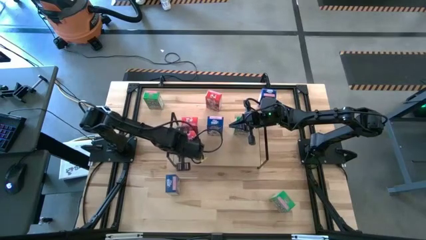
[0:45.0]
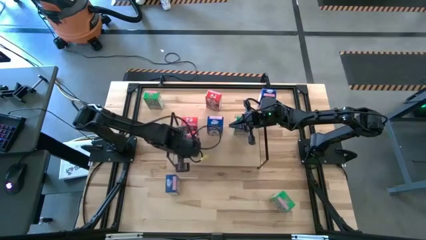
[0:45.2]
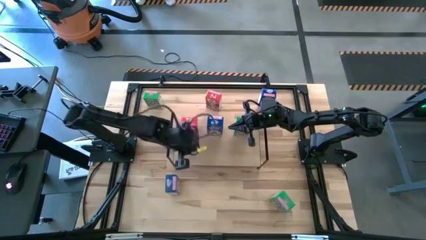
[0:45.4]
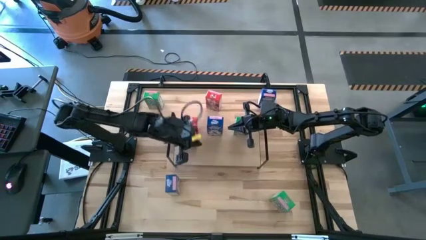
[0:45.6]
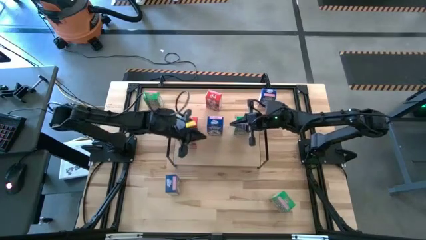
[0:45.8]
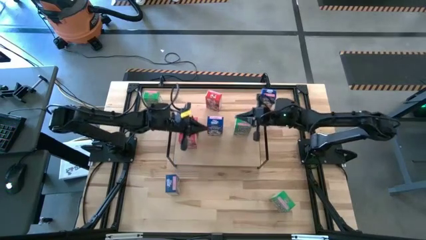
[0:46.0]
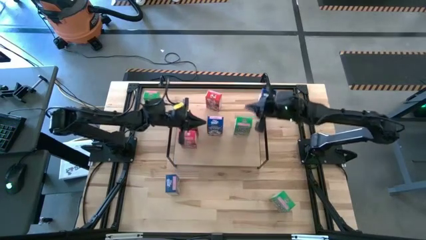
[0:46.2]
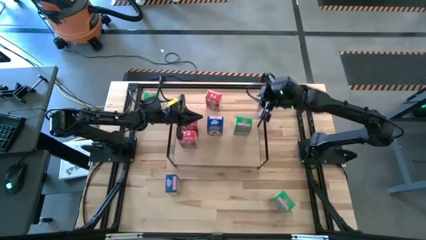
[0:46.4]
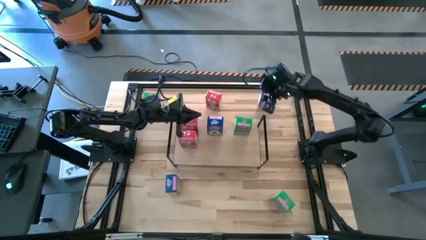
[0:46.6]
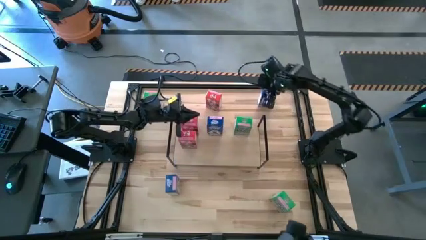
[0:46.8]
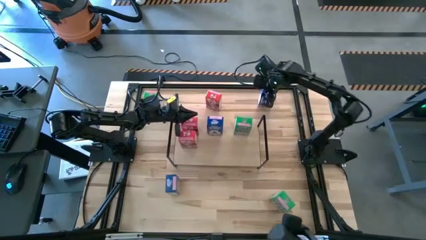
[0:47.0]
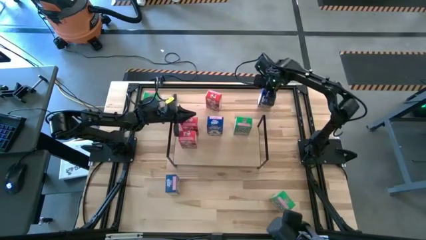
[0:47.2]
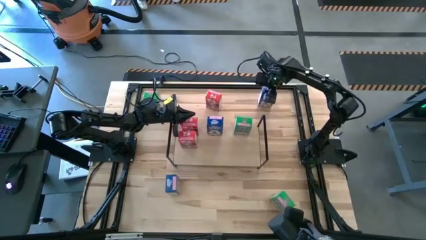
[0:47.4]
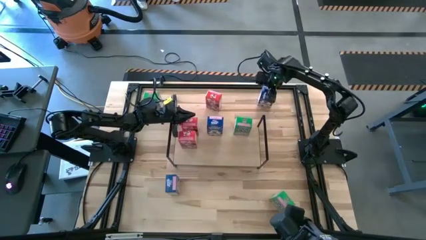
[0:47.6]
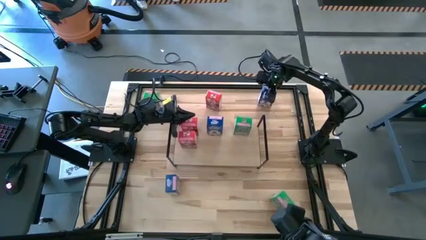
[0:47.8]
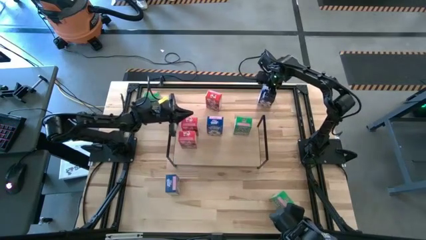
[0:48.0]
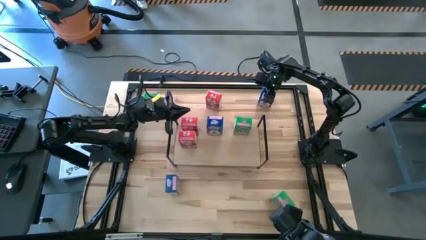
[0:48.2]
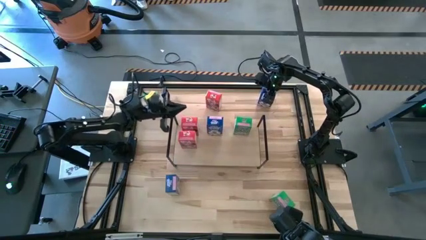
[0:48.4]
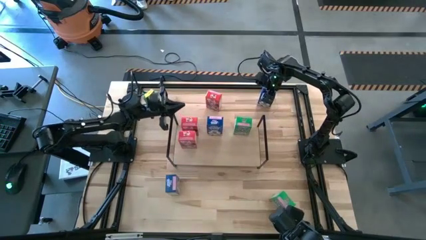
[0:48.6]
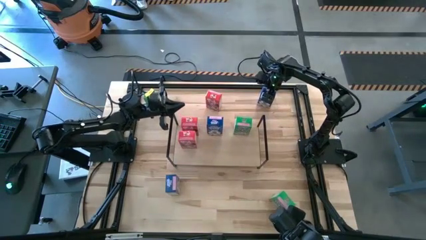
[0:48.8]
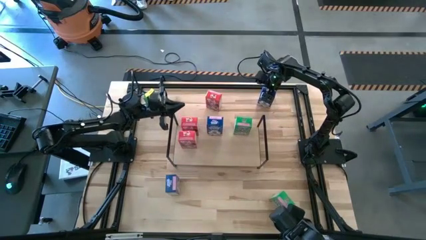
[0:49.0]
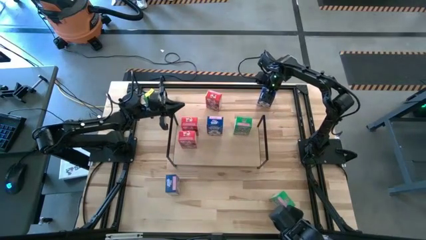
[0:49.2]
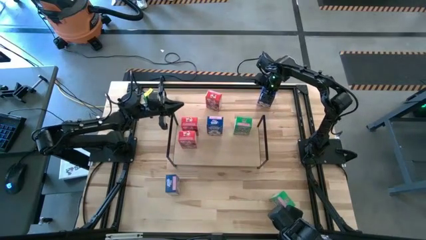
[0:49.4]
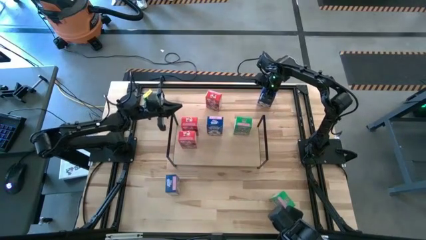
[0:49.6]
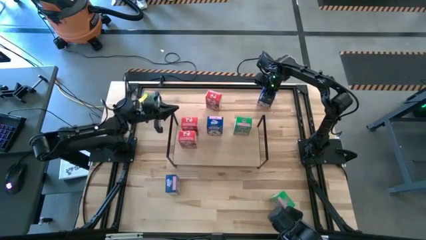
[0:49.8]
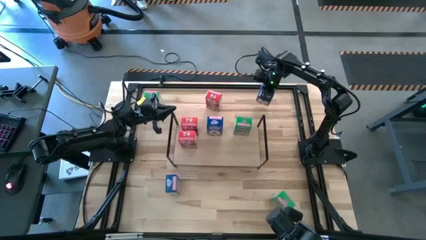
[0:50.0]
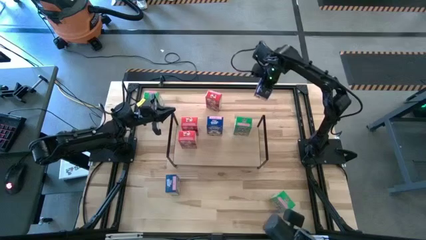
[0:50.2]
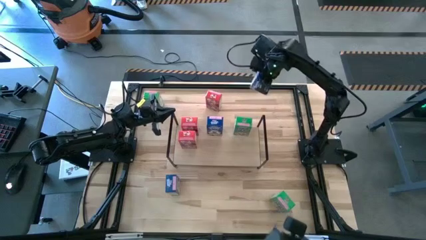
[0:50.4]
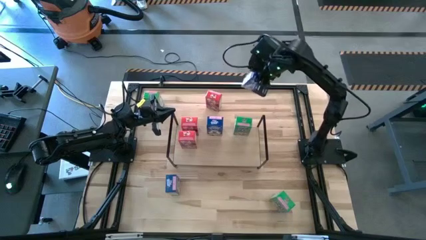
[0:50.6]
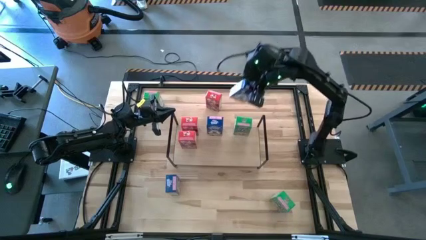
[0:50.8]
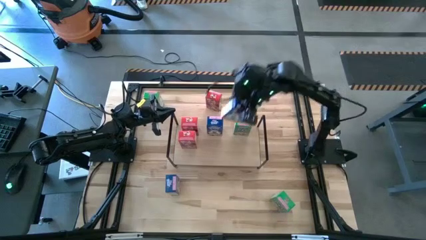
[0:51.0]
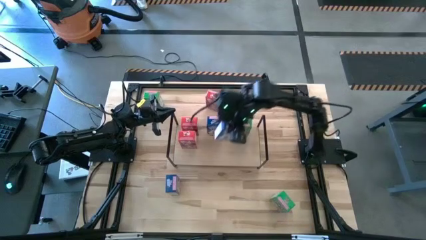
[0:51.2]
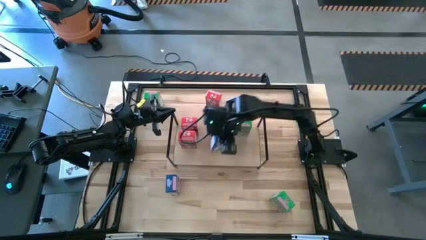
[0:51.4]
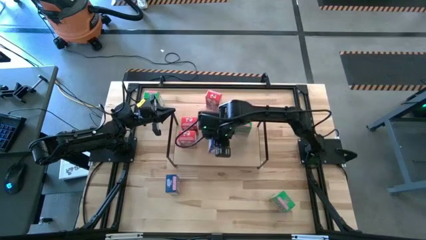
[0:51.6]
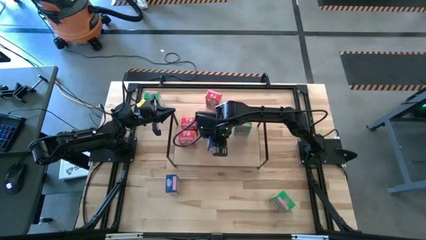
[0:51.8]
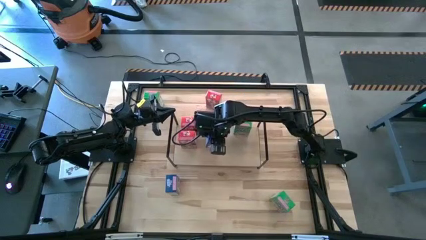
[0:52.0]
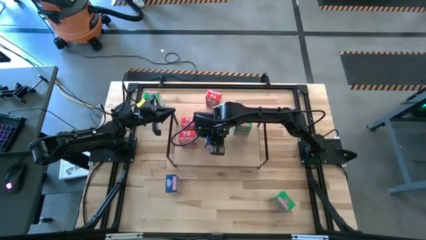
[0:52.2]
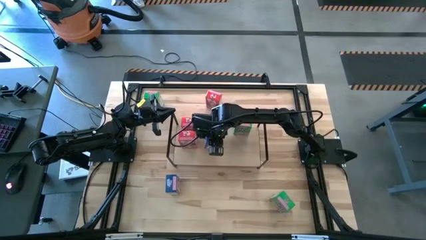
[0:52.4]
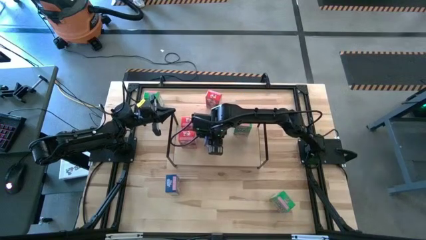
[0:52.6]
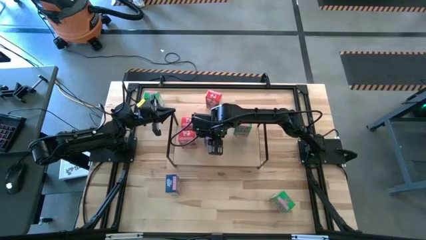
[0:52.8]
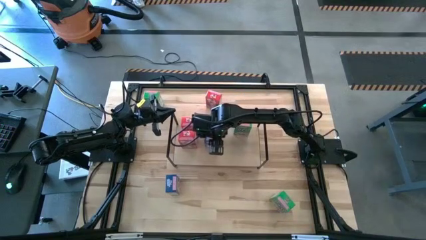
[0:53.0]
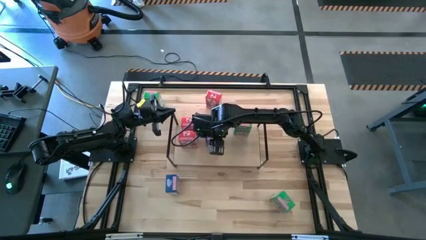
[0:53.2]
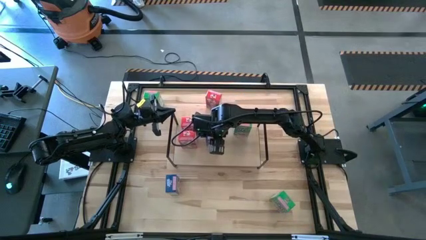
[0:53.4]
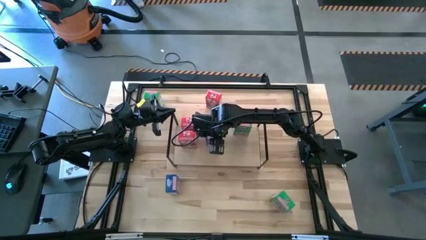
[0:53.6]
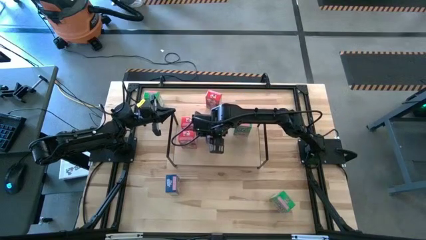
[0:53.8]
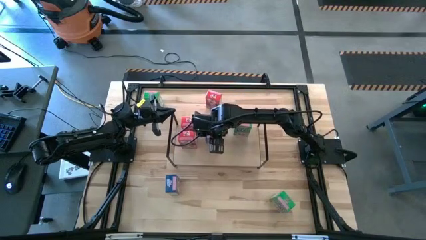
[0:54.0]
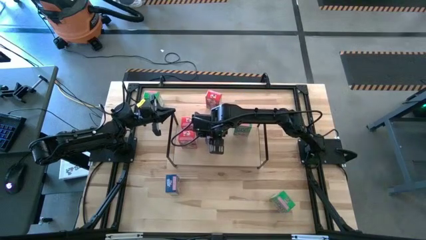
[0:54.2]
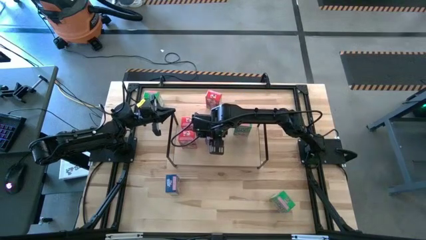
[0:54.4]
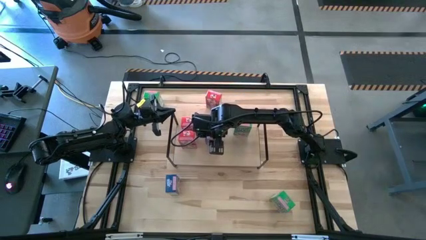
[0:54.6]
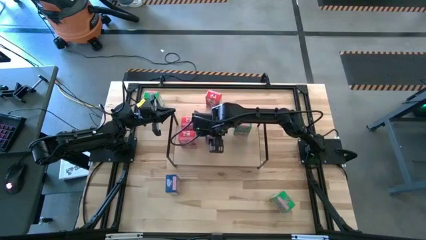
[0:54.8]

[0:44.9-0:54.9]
Task: Stack cereal on shelf
Put the top blue cereal box on the shelf aligned with the other blue cereal box

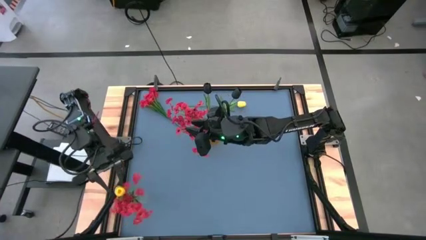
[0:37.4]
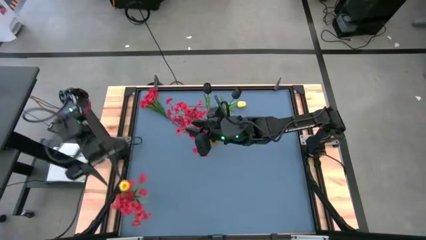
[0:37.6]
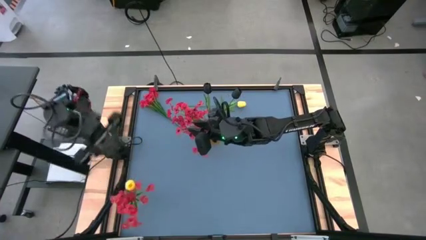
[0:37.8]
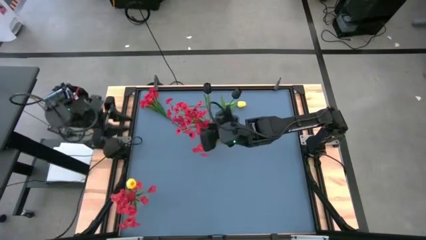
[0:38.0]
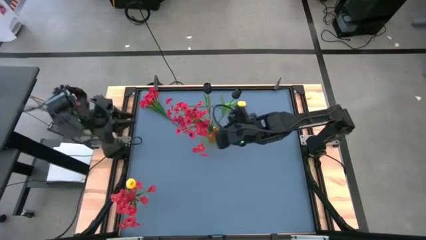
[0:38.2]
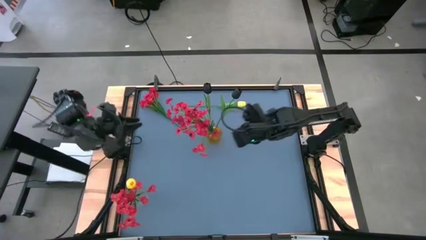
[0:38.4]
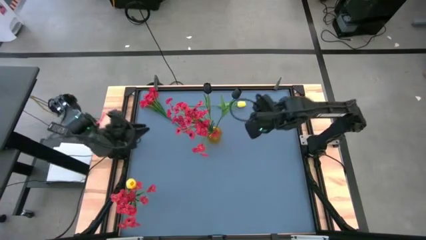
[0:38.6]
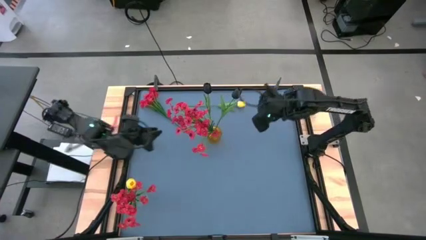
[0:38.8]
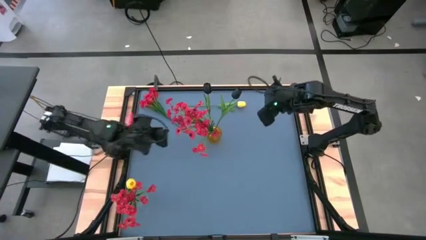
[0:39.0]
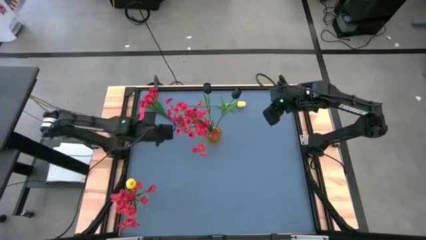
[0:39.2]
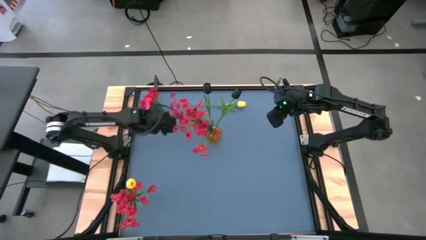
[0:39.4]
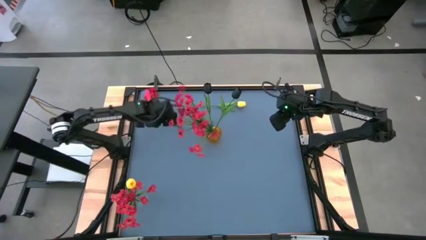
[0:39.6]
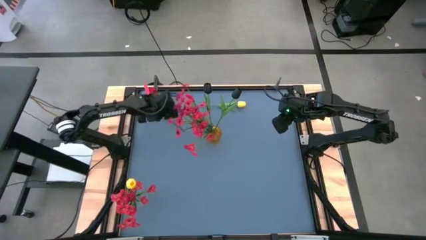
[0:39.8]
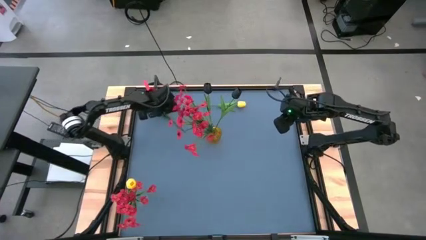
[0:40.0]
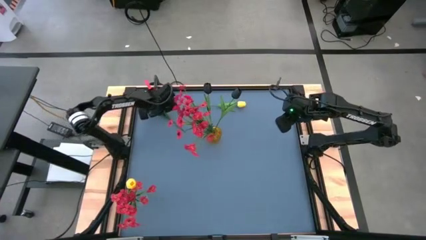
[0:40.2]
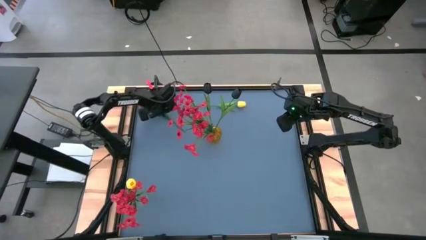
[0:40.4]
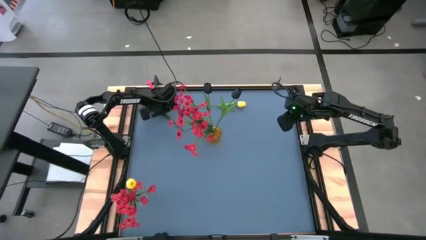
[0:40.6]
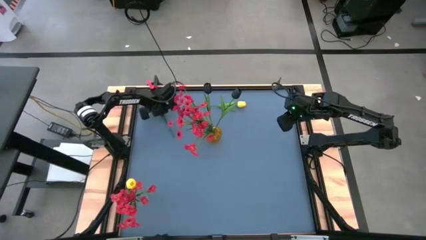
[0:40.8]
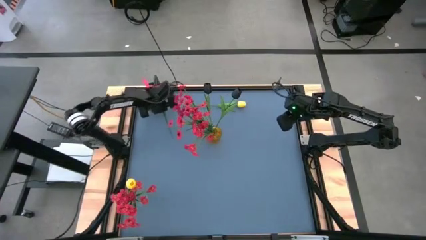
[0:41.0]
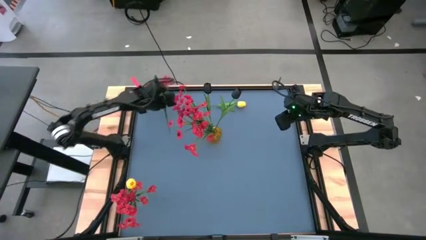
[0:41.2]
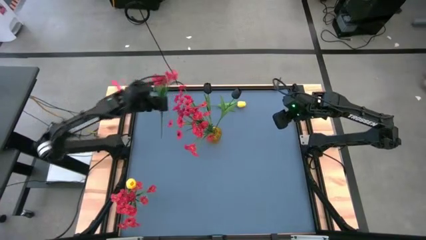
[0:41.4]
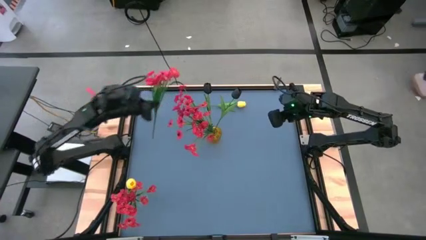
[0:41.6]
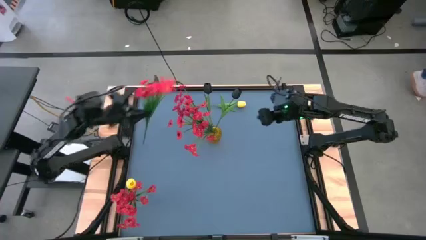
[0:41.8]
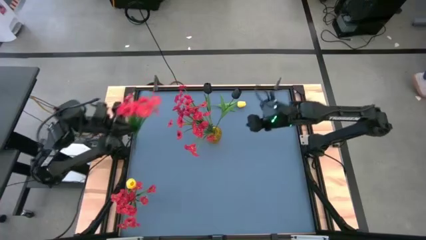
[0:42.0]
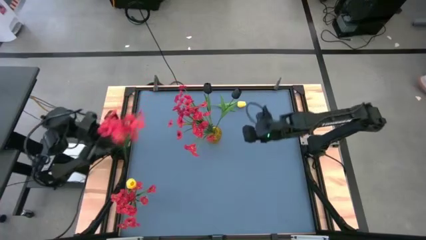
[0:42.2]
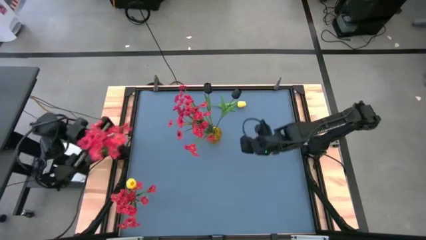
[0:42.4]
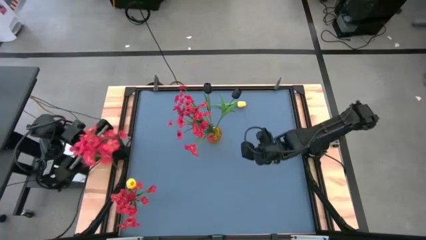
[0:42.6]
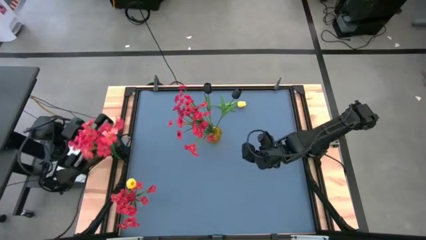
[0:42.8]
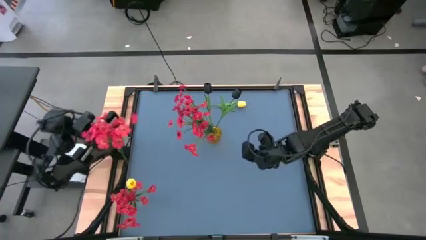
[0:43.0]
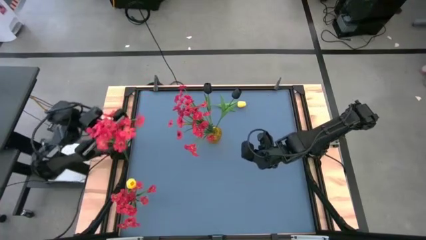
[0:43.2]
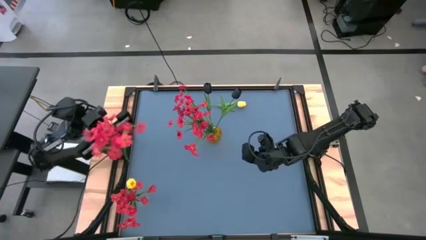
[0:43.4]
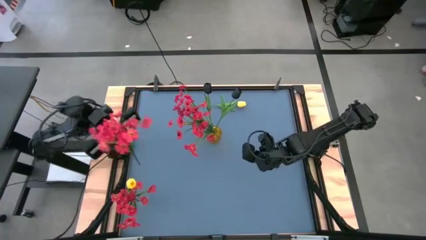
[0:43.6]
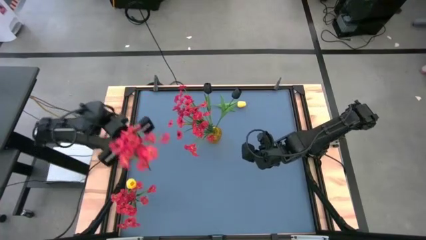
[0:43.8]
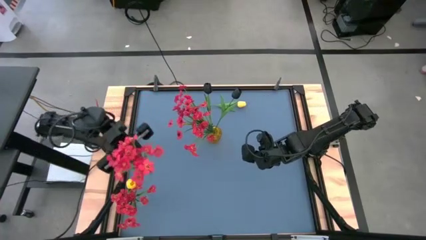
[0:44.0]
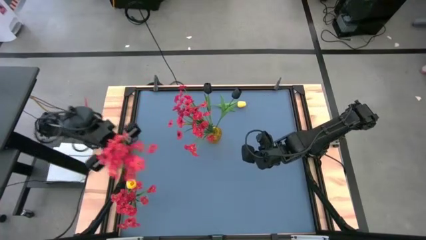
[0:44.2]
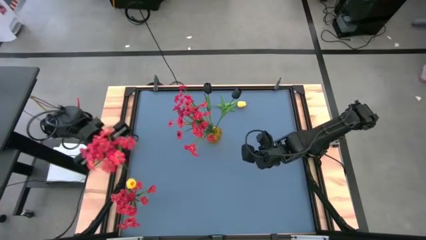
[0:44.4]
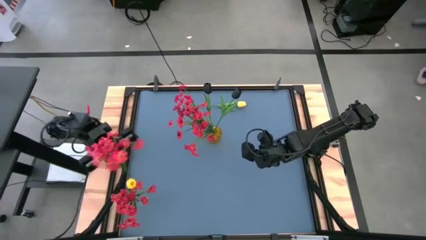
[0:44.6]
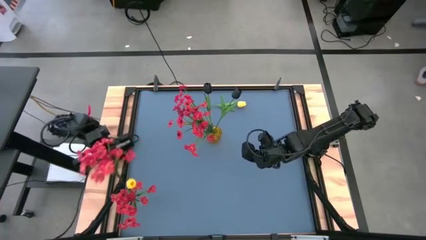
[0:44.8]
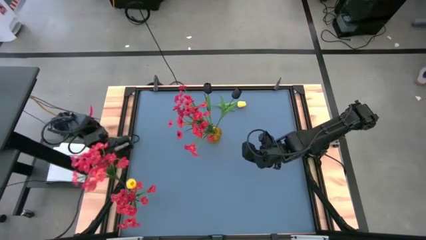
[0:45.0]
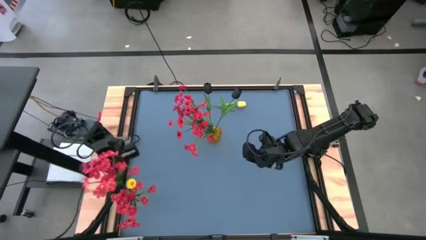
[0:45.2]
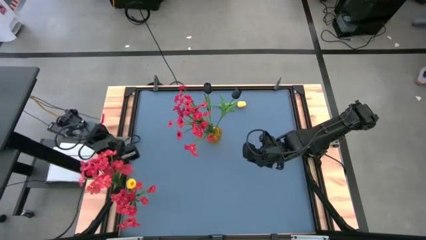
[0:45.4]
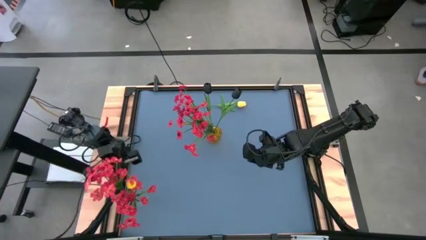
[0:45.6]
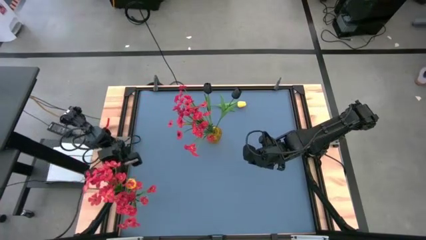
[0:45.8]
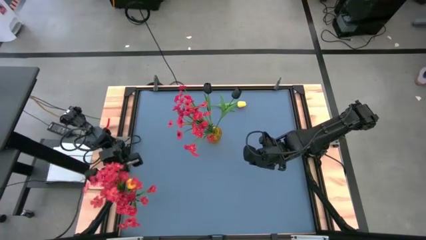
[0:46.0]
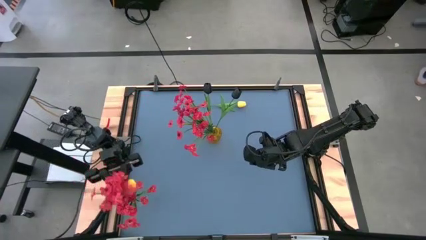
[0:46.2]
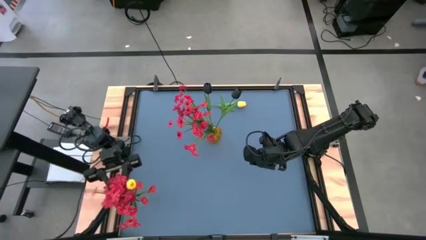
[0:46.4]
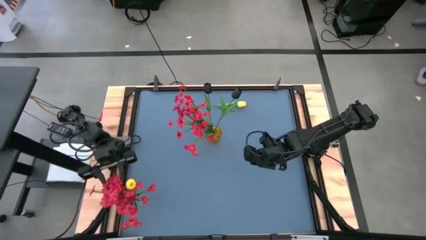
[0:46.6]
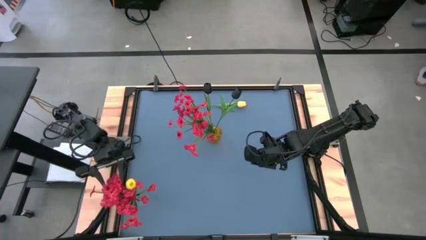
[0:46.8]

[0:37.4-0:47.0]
Task: Sort flowers into vase by color
Put the red flowers into the transparent vase
